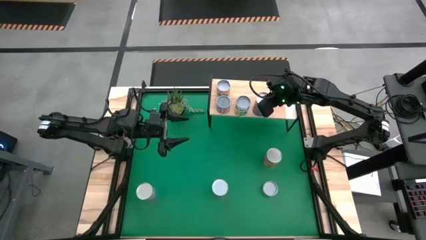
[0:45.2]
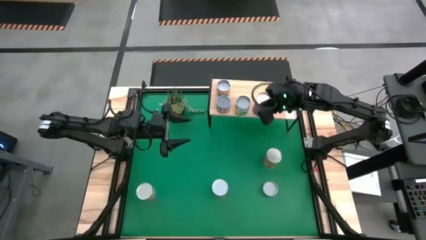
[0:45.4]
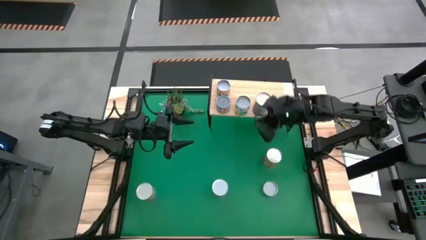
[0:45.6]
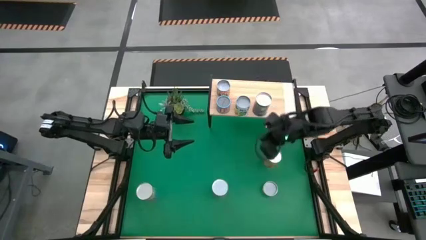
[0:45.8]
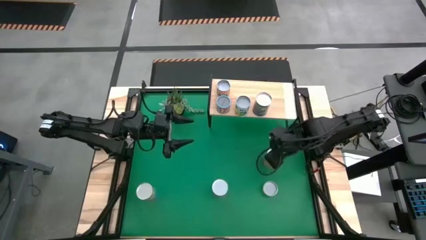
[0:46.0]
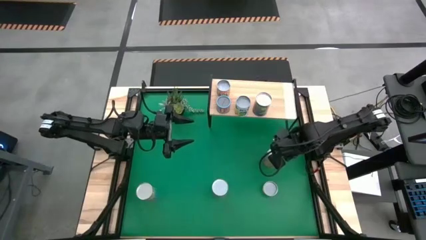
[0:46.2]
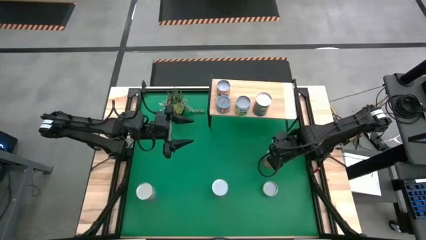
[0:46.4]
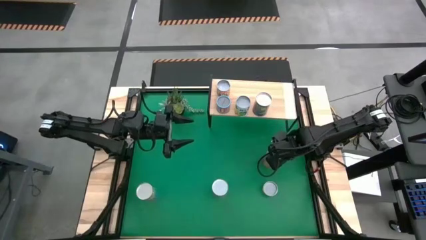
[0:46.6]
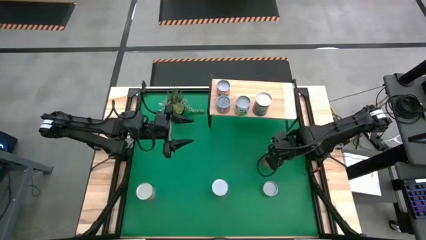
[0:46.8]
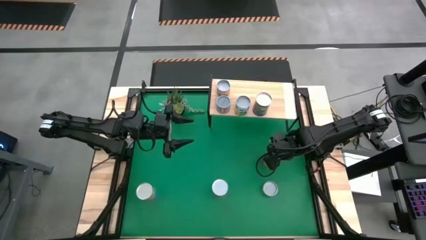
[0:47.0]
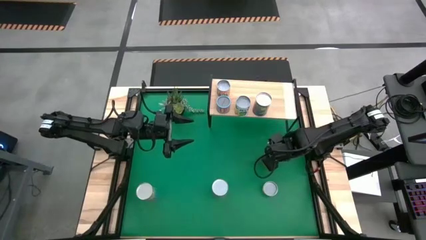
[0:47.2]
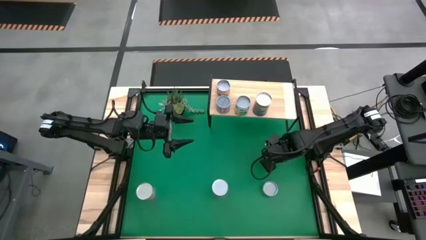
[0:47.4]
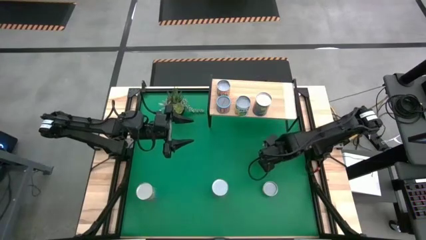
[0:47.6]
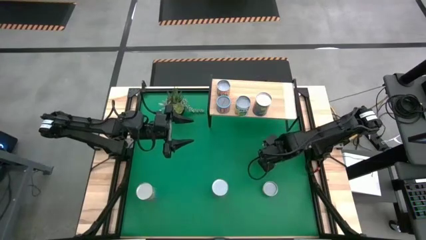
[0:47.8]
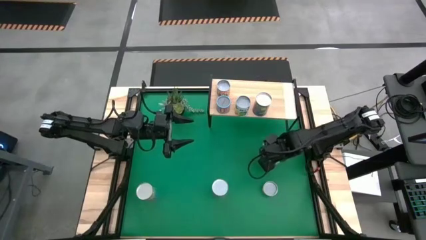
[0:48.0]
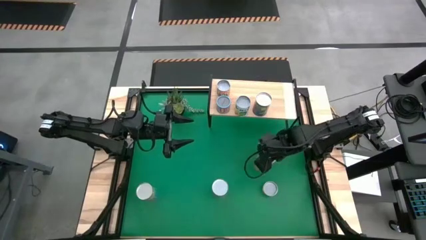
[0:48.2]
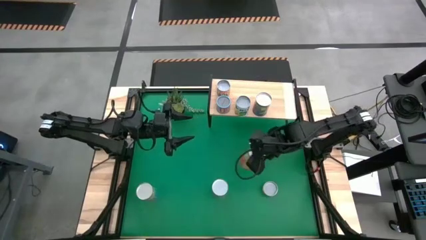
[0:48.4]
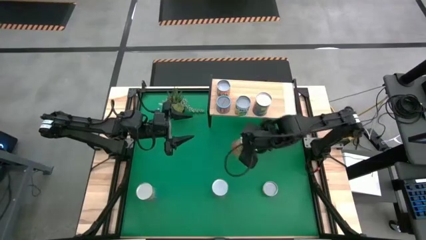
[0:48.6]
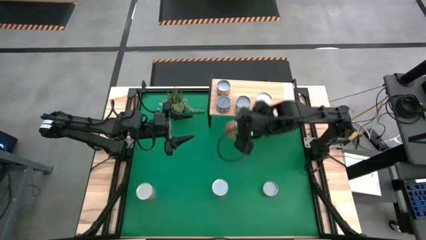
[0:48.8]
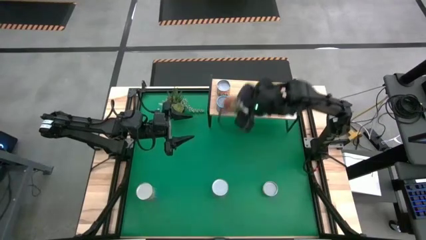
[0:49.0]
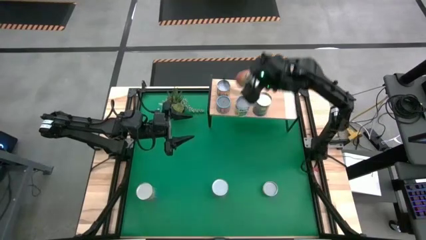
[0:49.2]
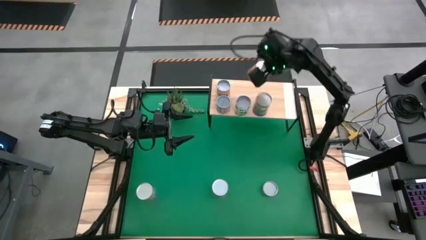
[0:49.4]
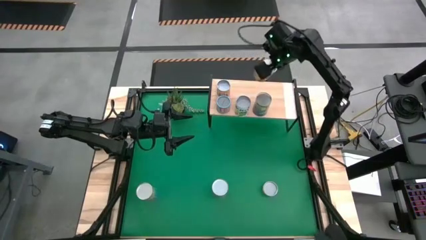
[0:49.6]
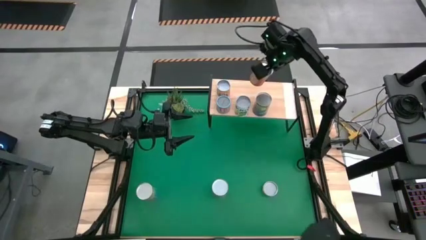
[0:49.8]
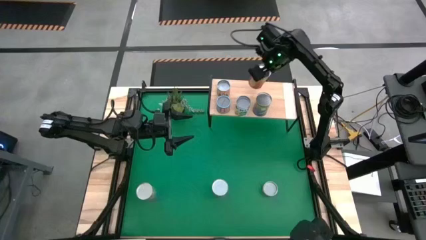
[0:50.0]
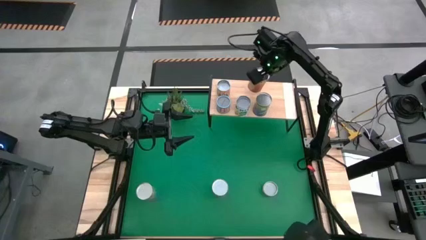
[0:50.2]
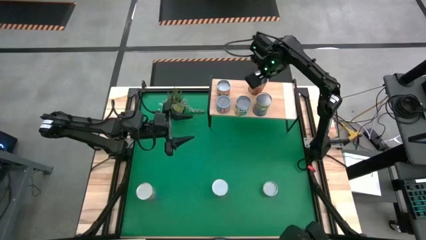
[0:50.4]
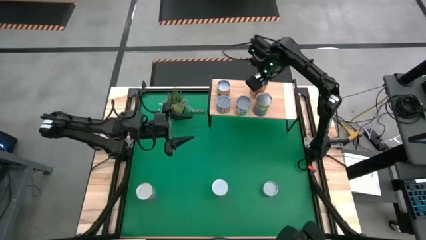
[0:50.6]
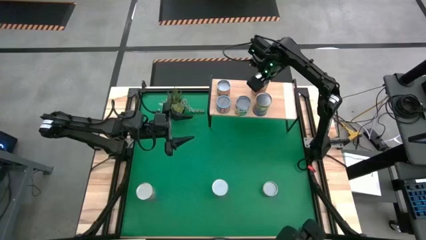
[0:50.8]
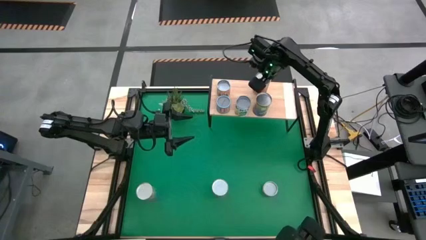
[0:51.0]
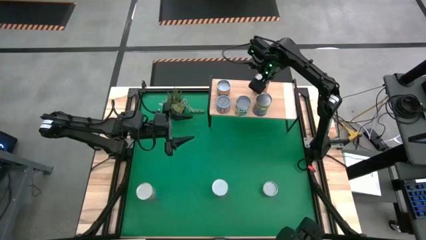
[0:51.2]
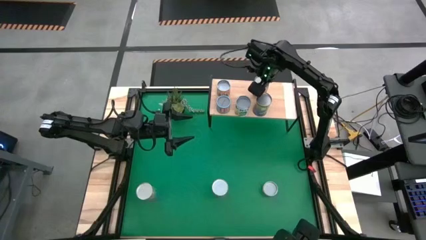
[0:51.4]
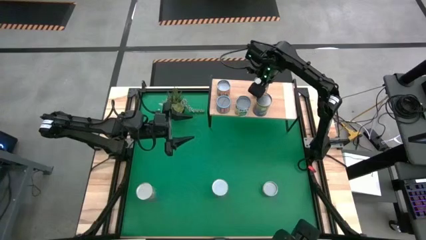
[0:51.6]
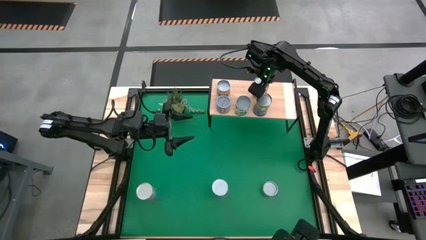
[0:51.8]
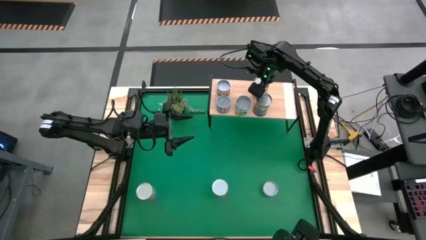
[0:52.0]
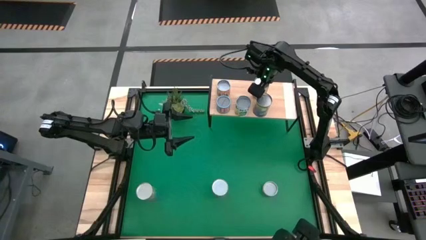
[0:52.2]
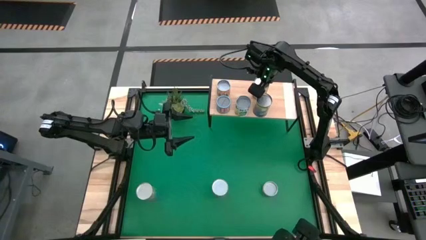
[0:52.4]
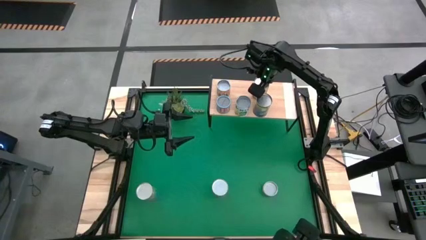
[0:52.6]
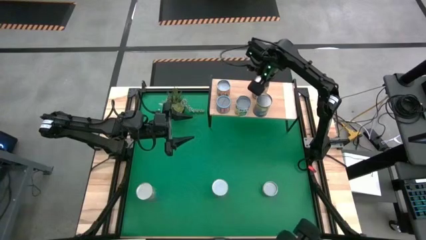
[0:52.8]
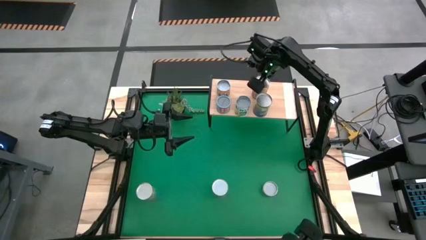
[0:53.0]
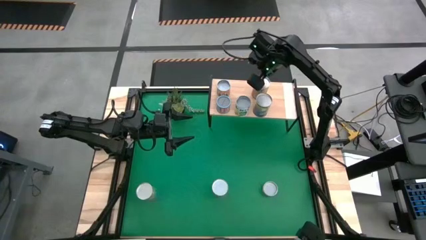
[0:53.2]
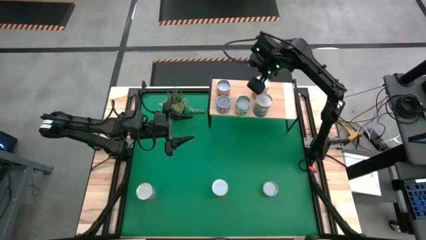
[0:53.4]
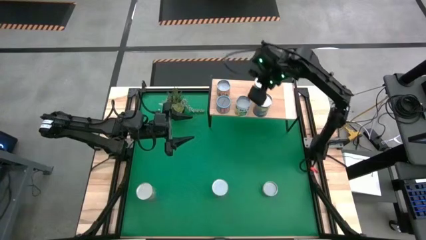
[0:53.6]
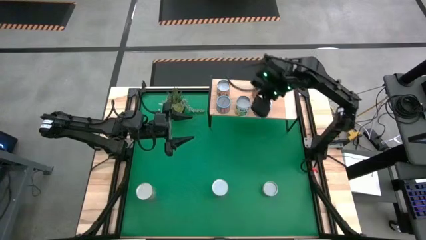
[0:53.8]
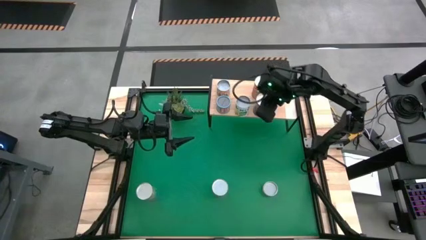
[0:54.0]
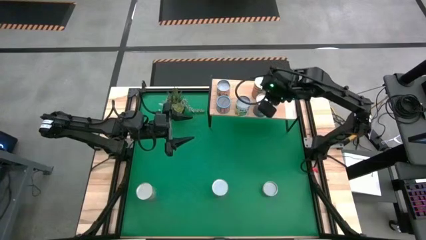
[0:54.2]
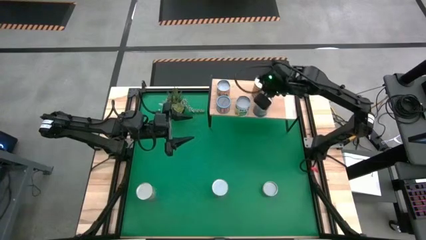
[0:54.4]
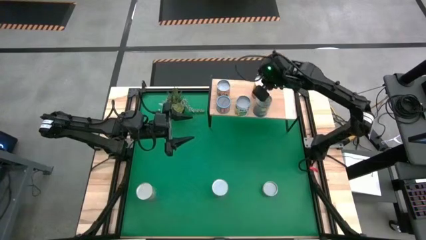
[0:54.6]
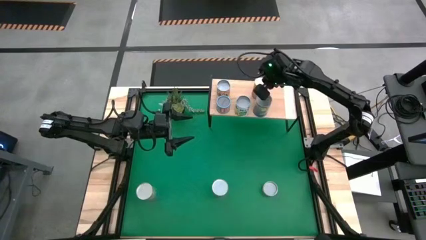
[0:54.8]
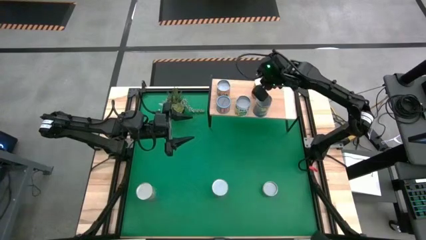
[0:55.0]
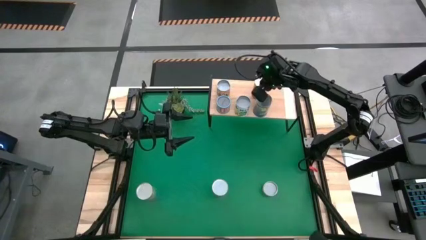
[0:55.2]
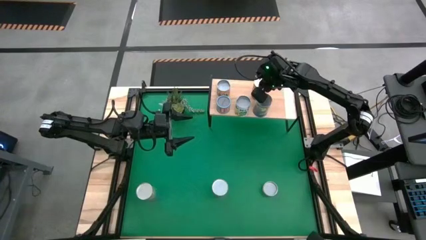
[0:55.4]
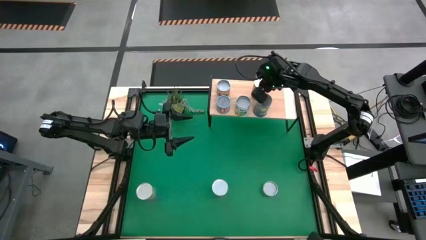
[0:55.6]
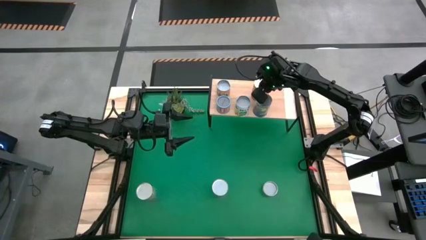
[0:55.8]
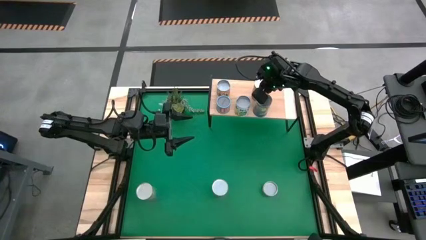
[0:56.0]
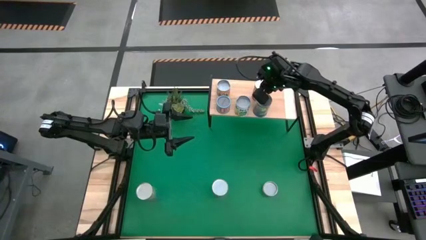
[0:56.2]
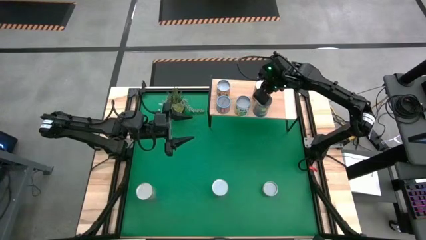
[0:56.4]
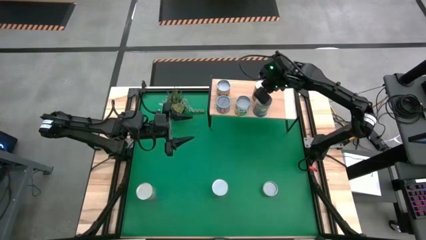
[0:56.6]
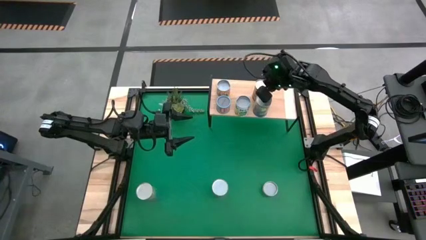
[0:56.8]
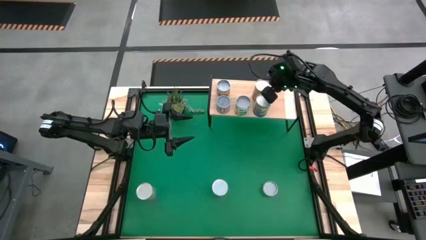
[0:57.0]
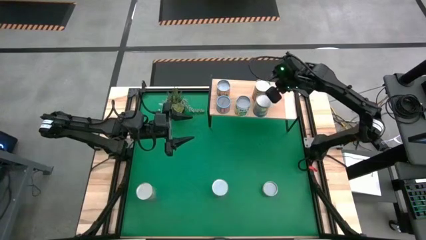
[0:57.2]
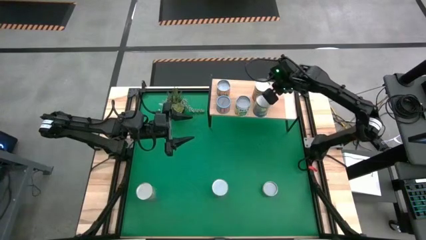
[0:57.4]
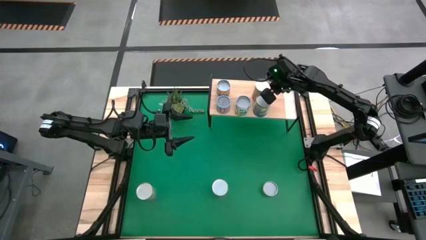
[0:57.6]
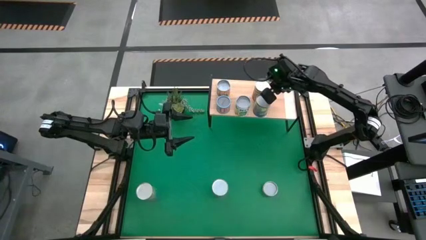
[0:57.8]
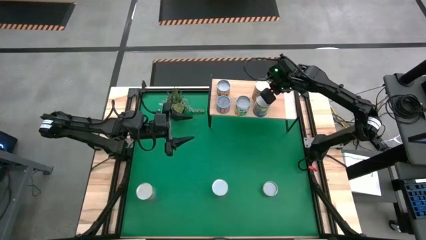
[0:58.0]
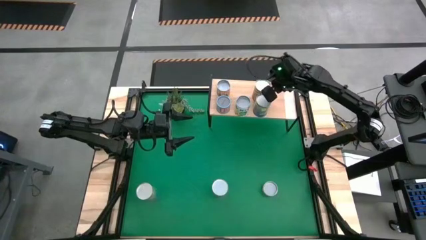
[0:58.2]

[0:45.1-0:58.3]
Task: Pick and place cans onto a shelf
Put the canned pineapples on the shelf
